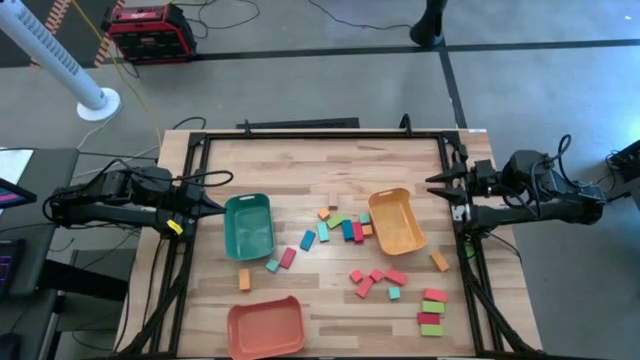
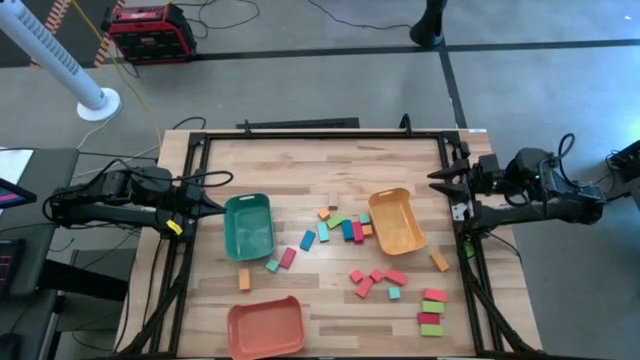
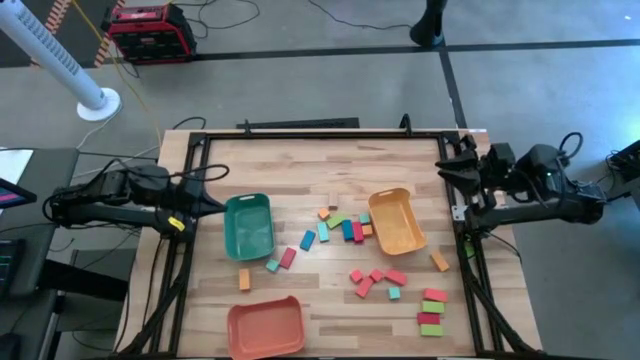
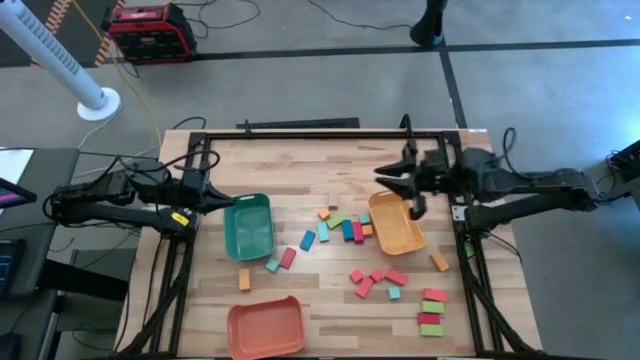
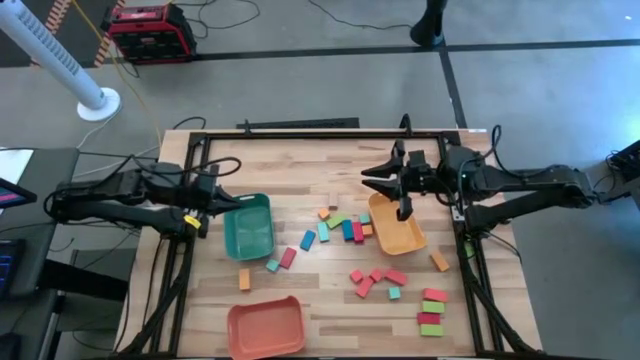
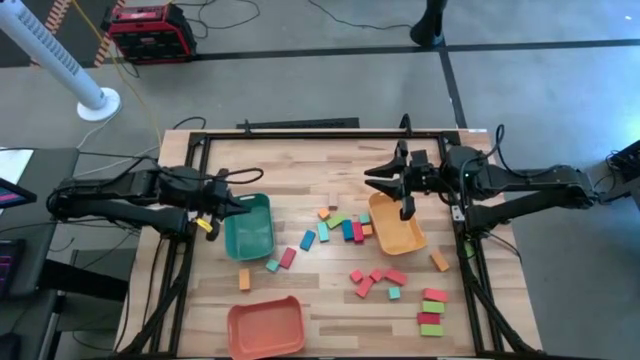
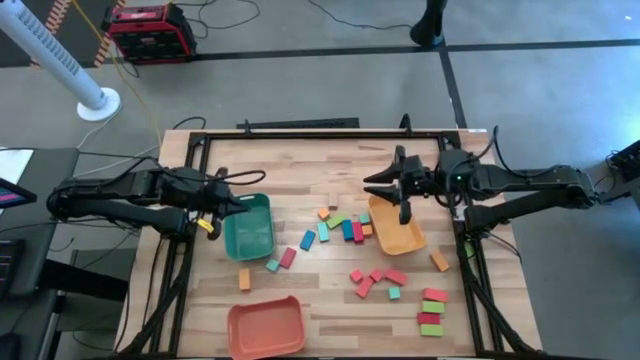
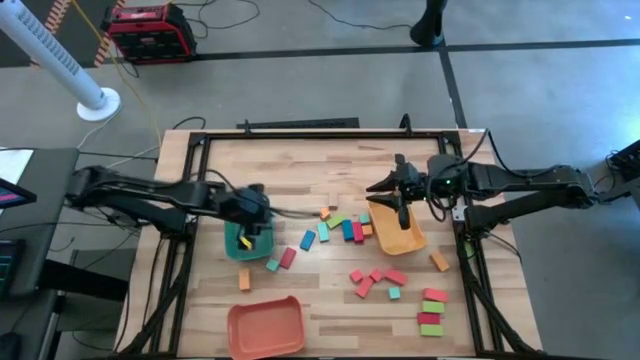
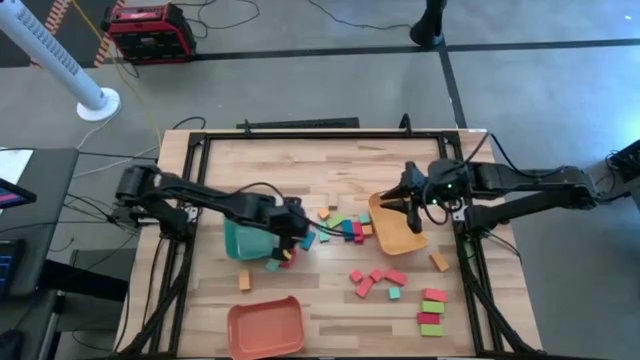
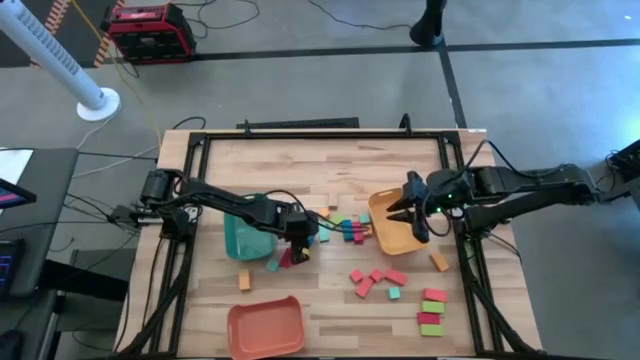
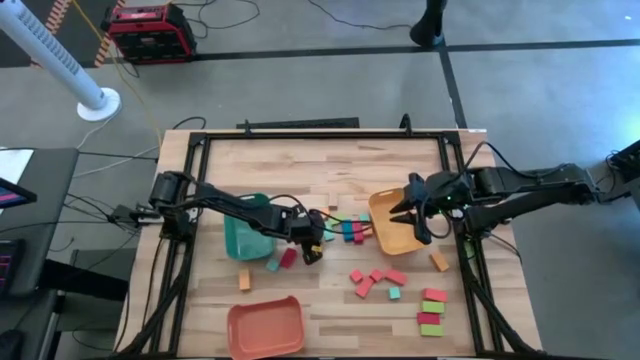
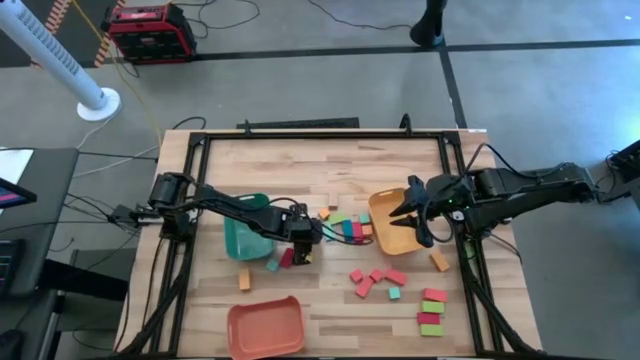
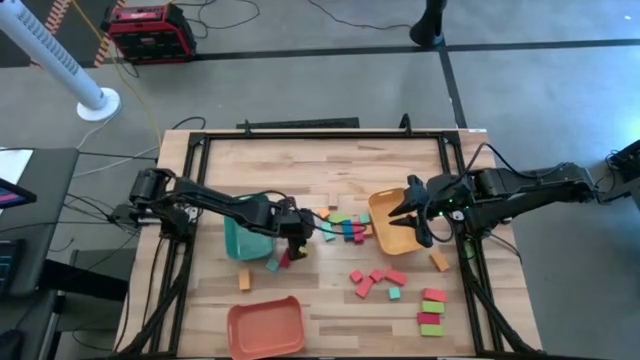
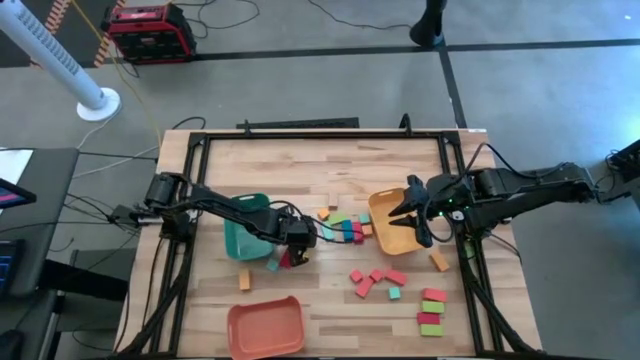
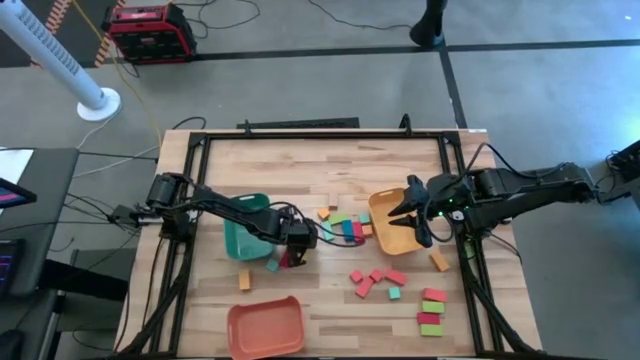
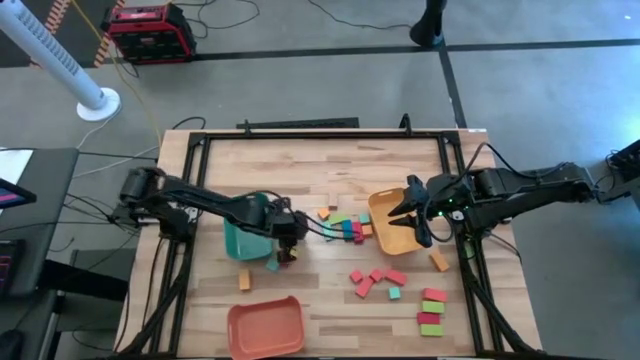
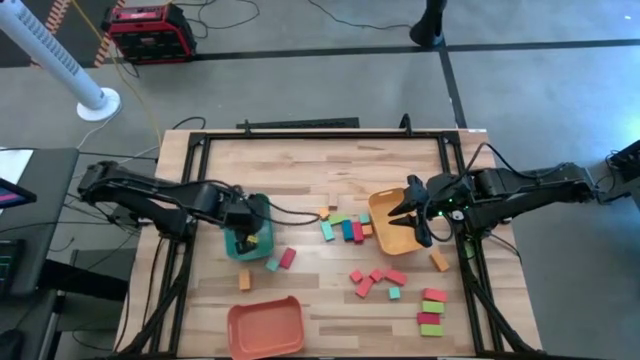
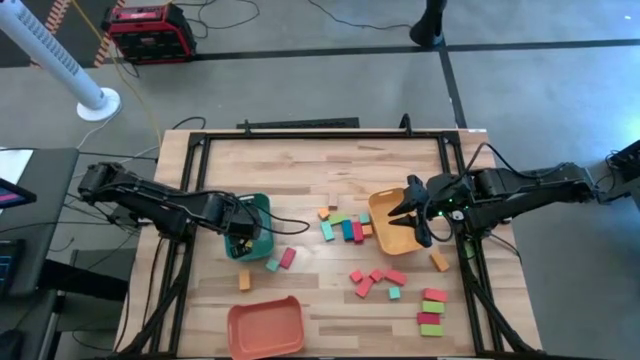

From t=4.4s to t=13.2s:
Task: Sort blocks by size
Put the thin blue rectangular block into the green bin

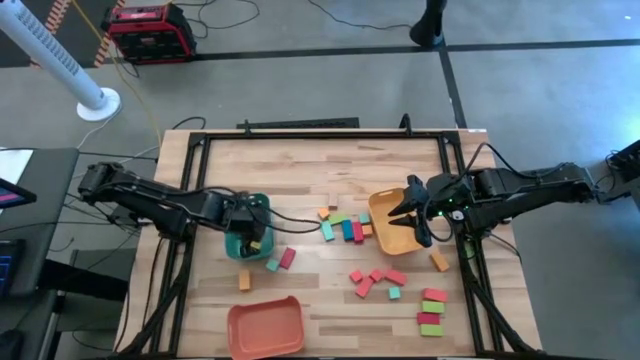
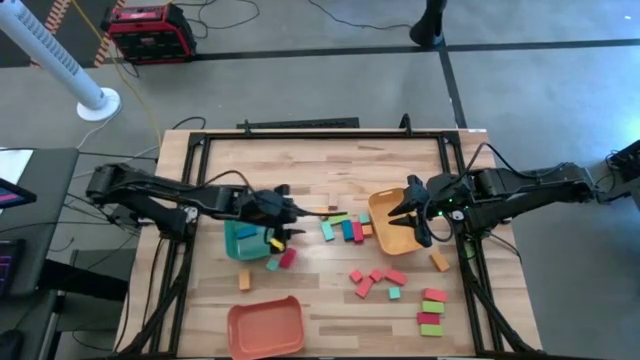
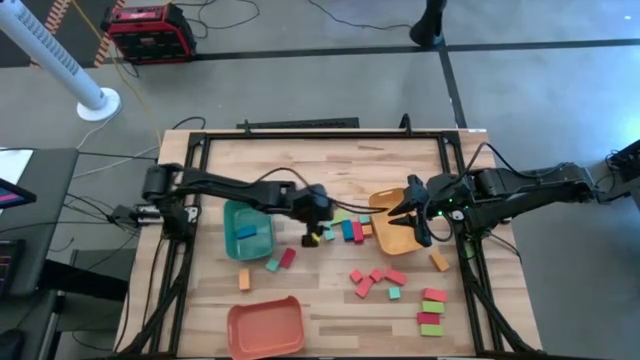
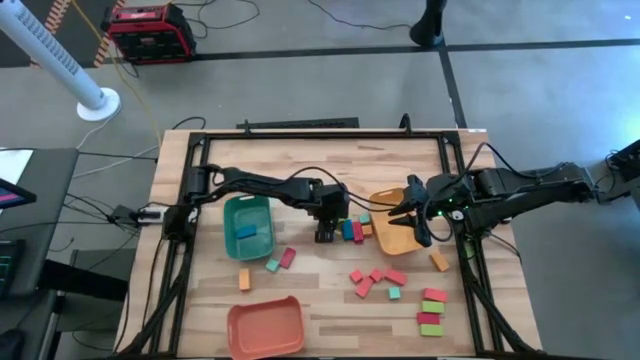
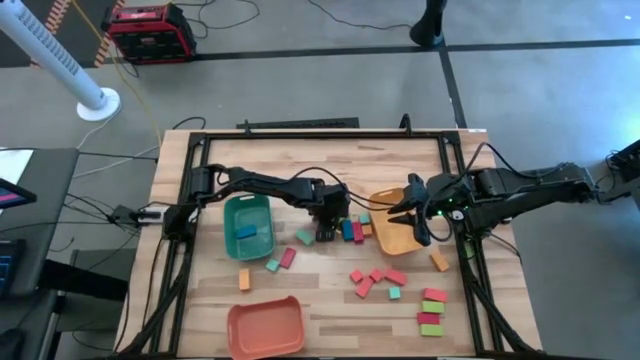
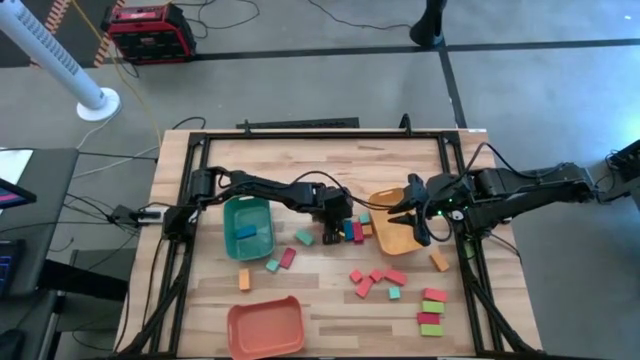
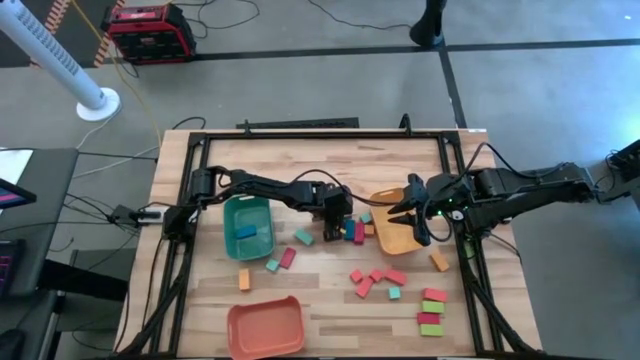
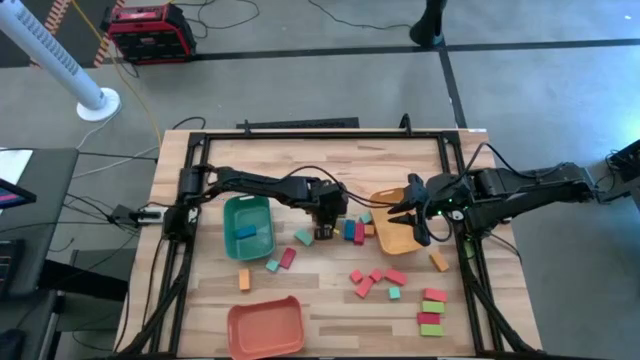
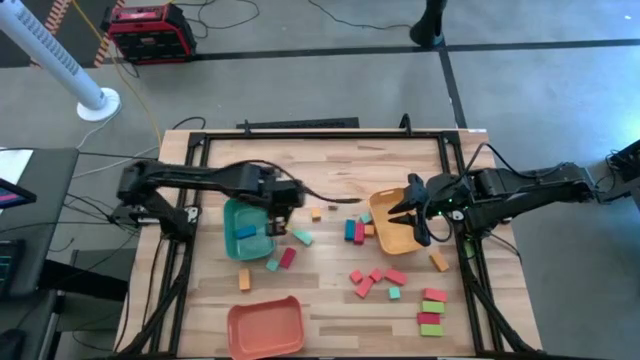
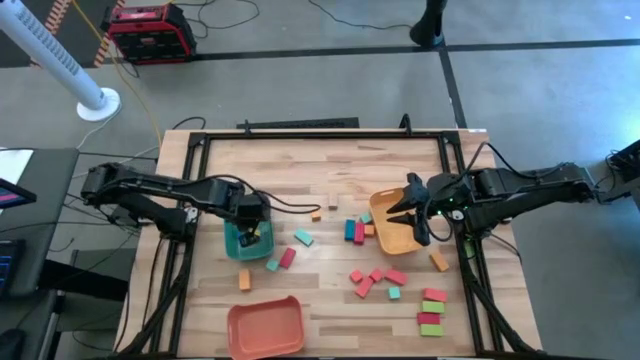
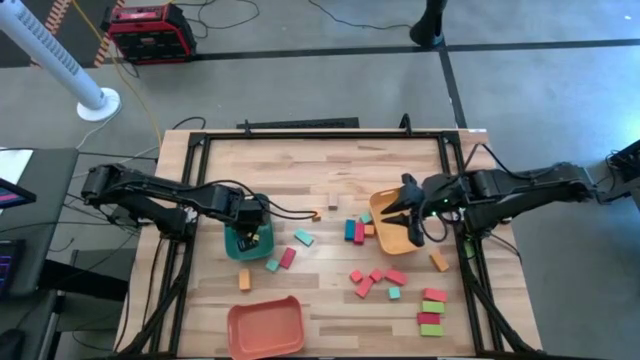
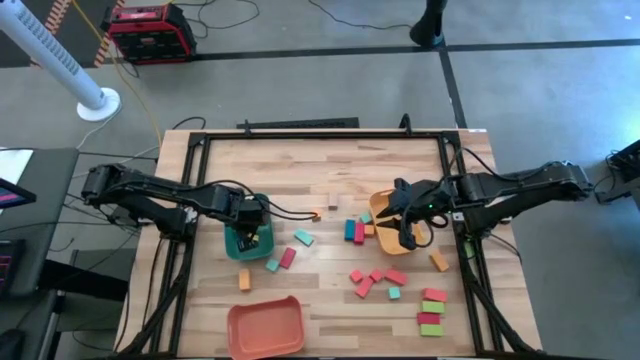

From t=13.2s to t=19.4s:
Put the thin top light green rectangular block into the green bin

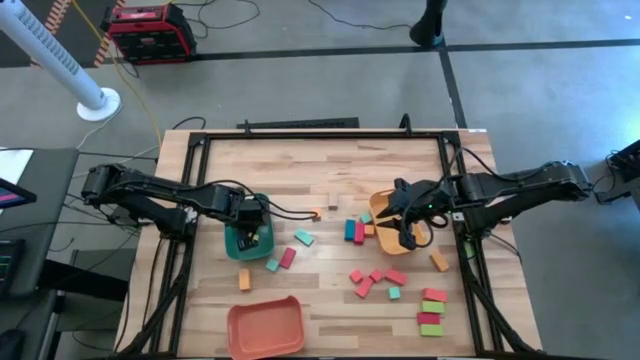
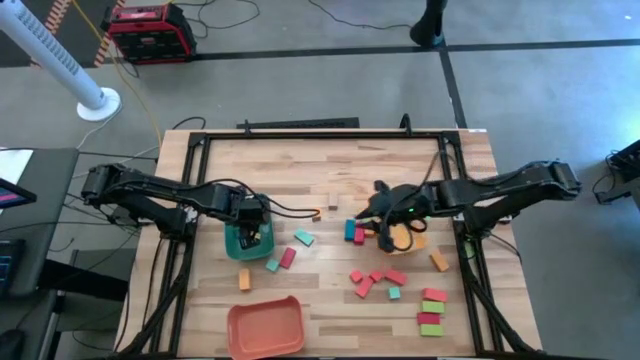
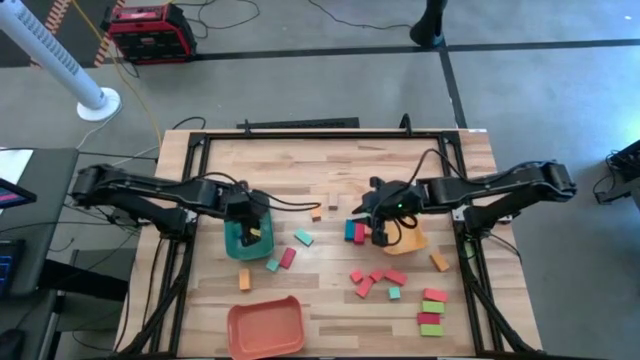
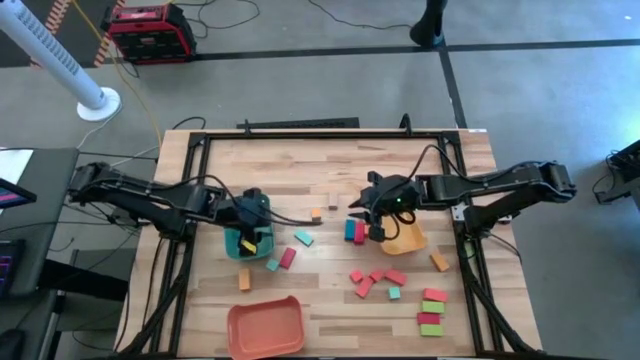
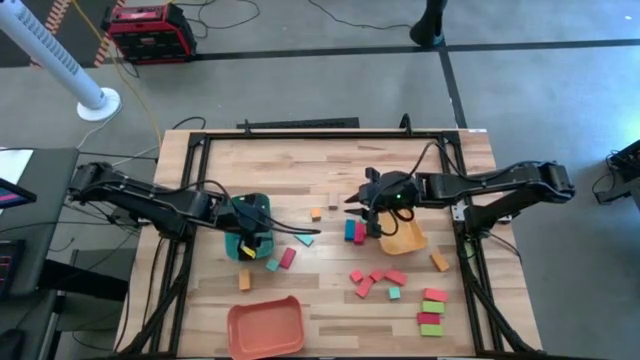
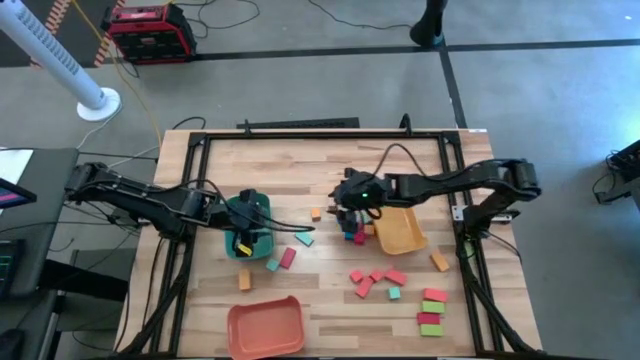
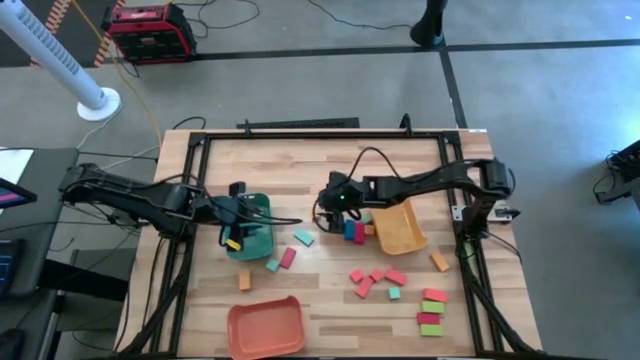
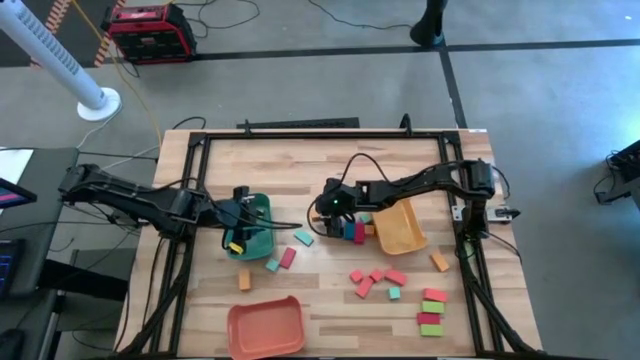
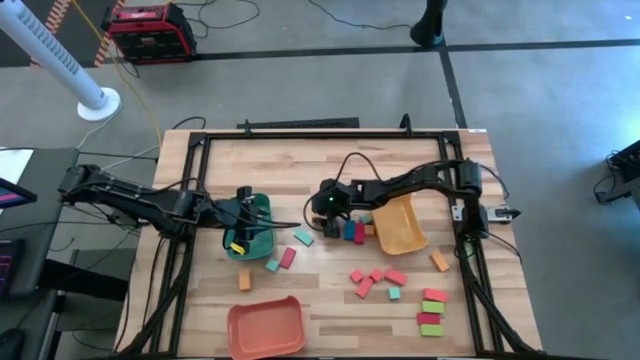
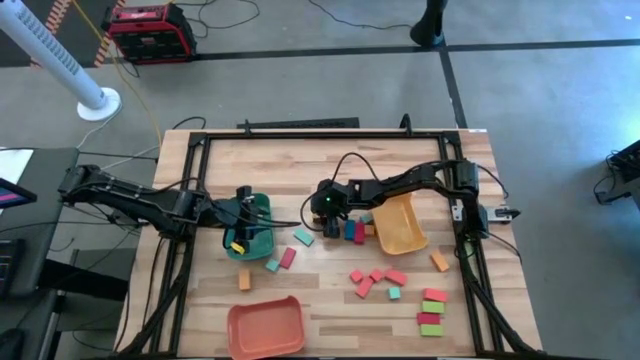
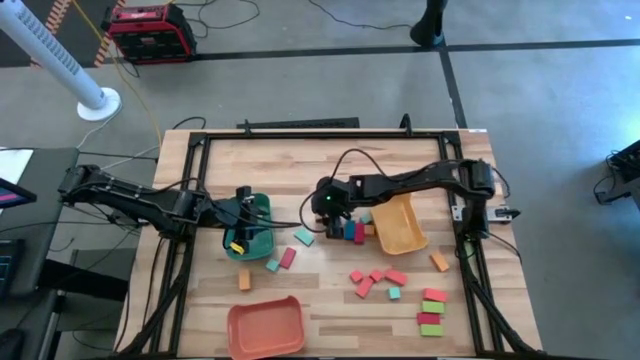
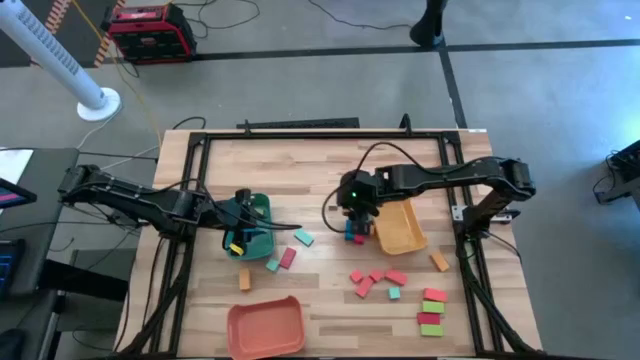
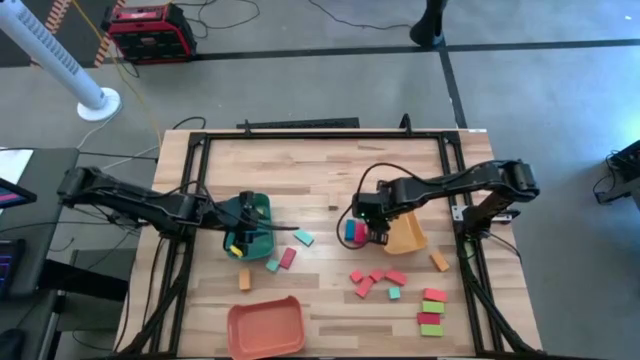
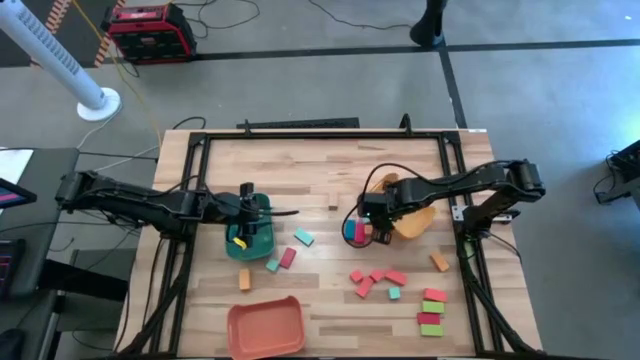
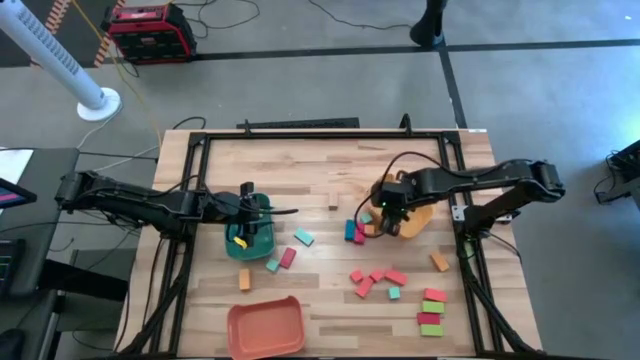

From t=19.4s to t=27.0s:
Put the top yellow cube block into the yellow bin
